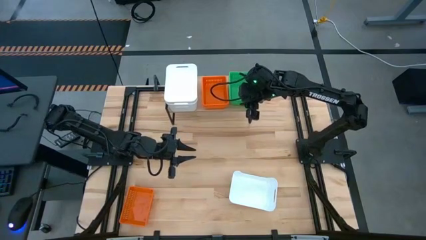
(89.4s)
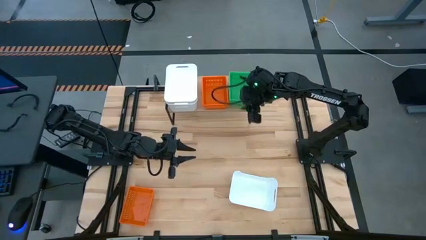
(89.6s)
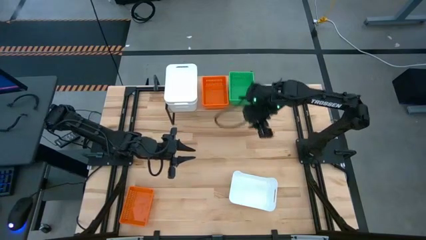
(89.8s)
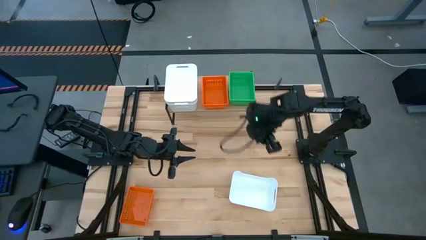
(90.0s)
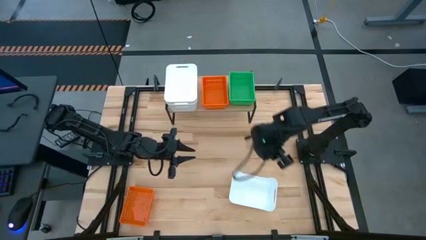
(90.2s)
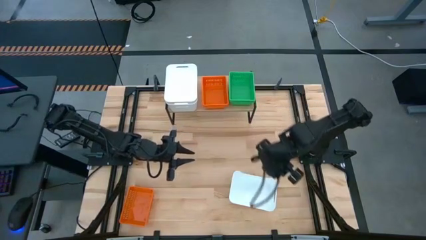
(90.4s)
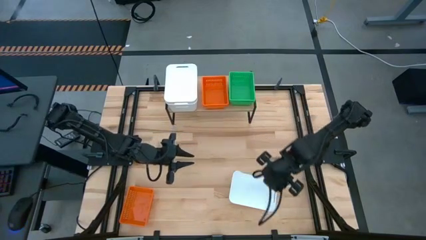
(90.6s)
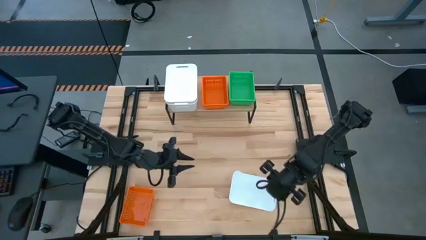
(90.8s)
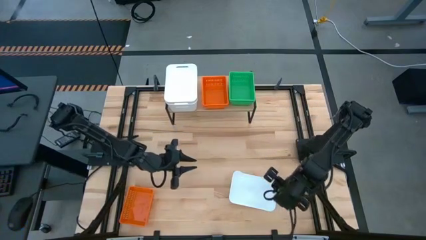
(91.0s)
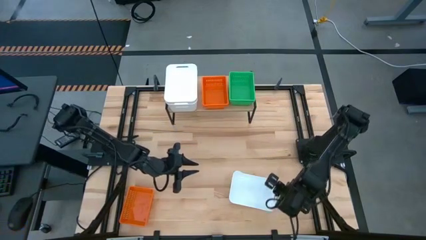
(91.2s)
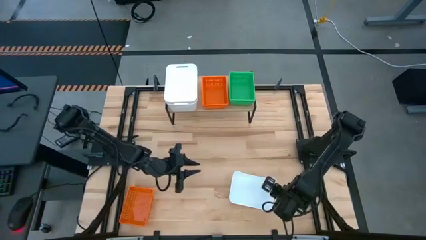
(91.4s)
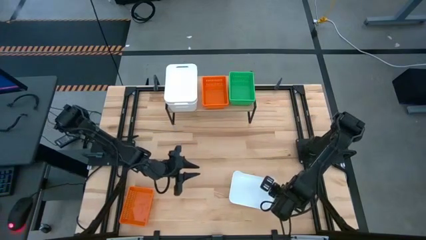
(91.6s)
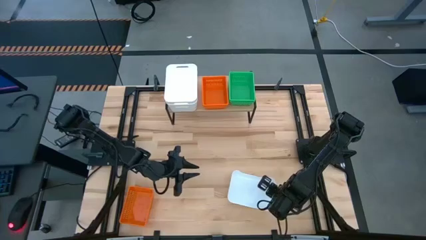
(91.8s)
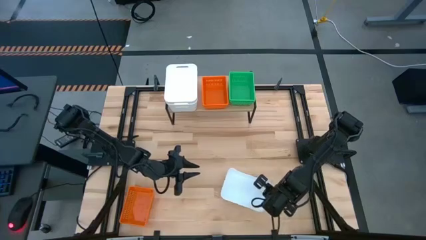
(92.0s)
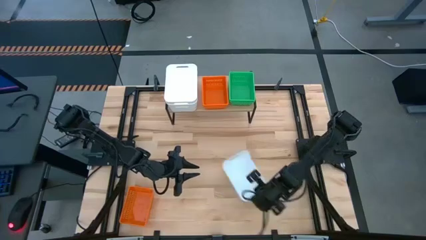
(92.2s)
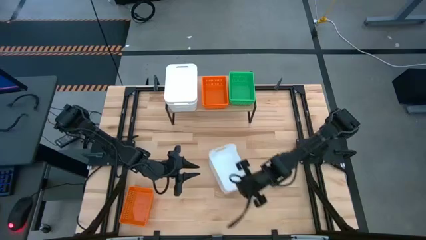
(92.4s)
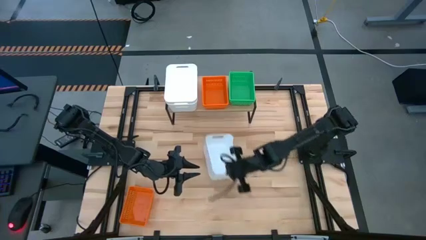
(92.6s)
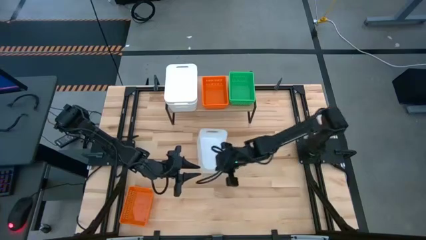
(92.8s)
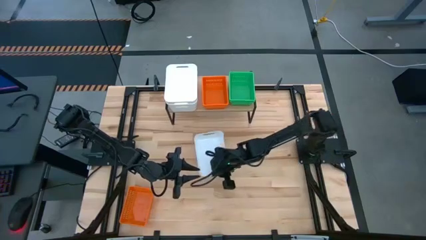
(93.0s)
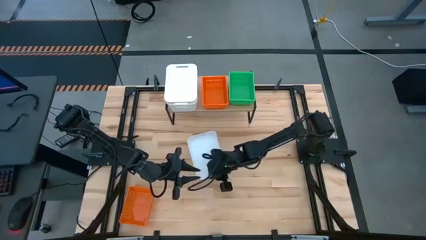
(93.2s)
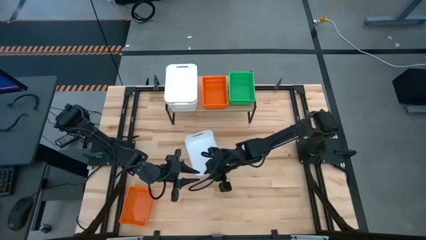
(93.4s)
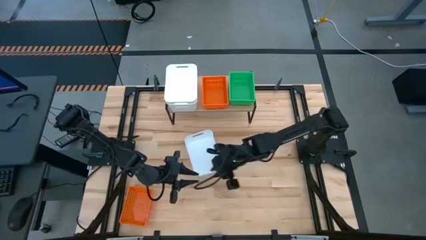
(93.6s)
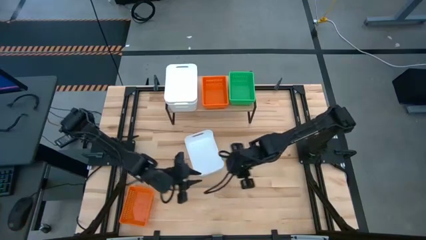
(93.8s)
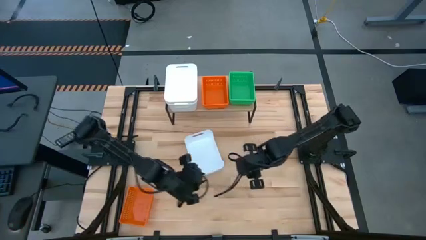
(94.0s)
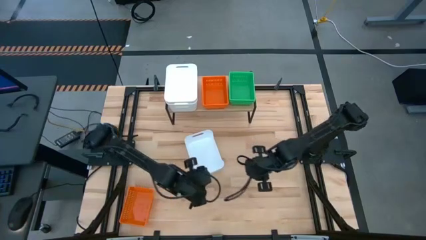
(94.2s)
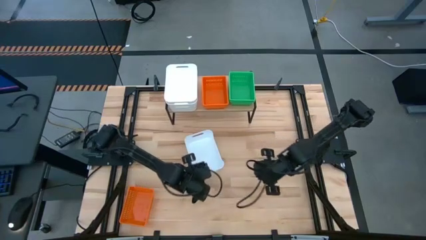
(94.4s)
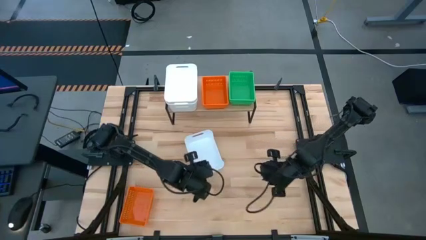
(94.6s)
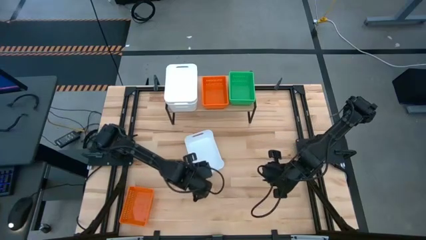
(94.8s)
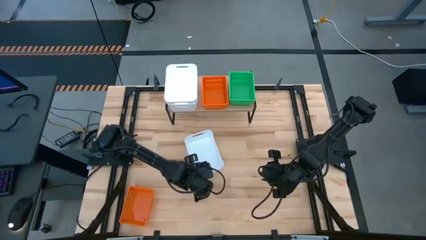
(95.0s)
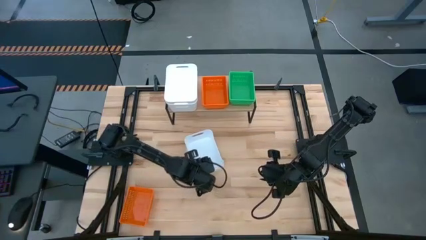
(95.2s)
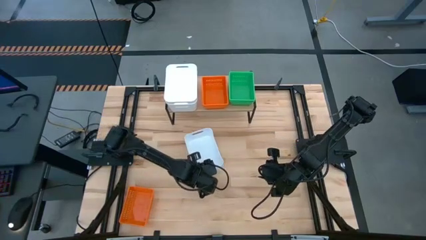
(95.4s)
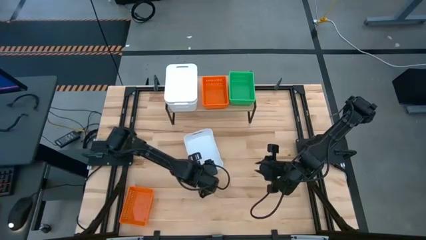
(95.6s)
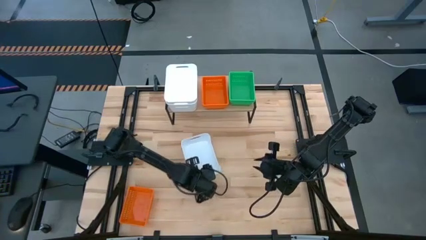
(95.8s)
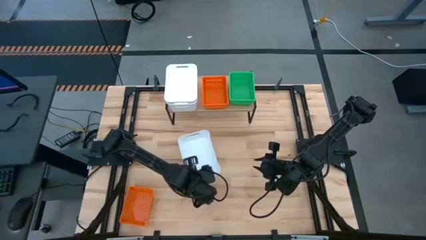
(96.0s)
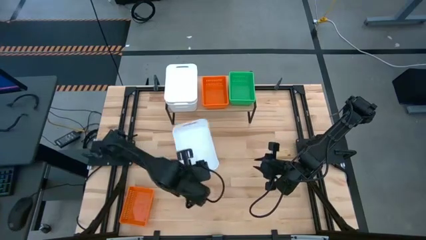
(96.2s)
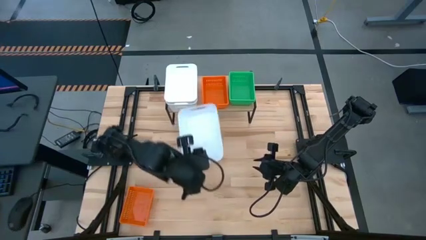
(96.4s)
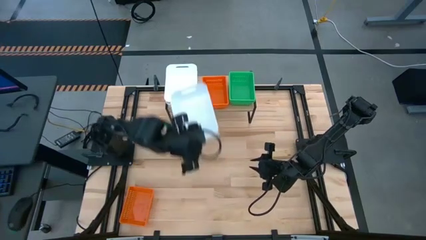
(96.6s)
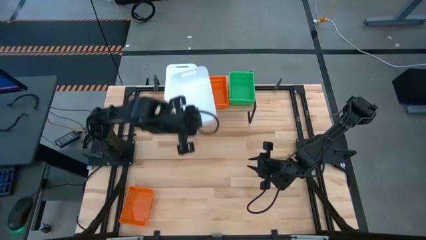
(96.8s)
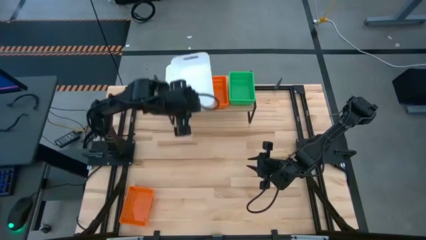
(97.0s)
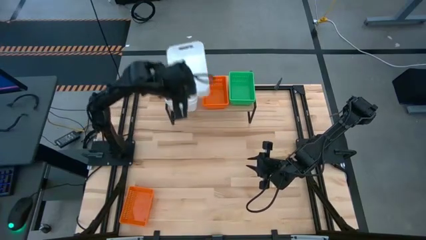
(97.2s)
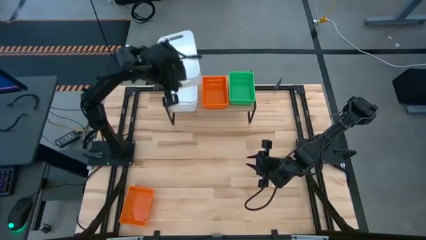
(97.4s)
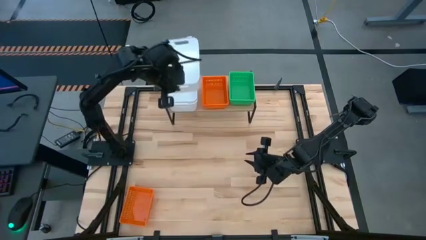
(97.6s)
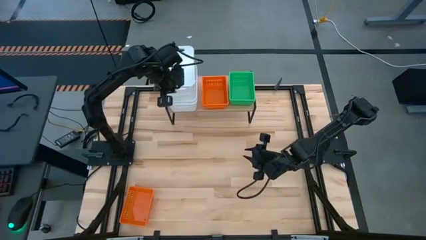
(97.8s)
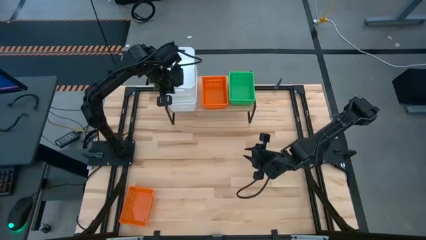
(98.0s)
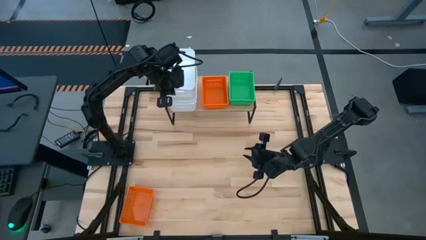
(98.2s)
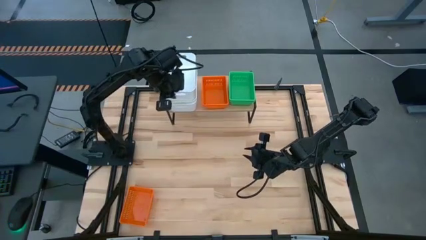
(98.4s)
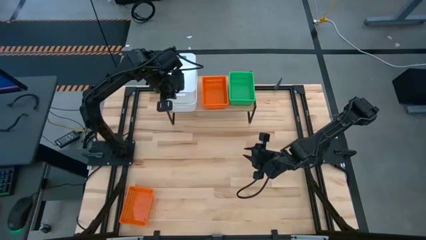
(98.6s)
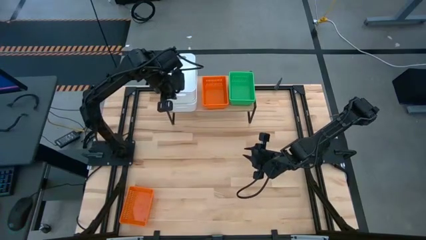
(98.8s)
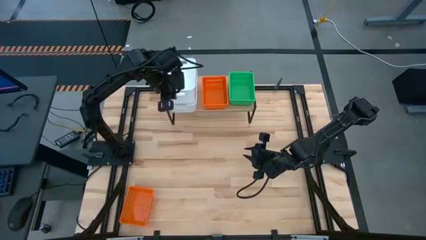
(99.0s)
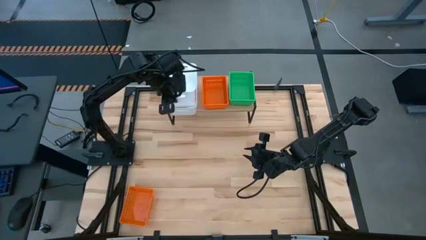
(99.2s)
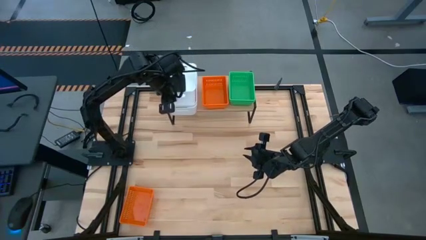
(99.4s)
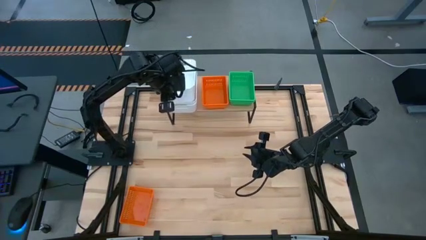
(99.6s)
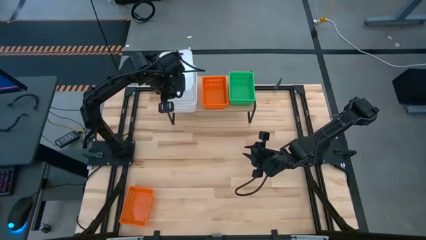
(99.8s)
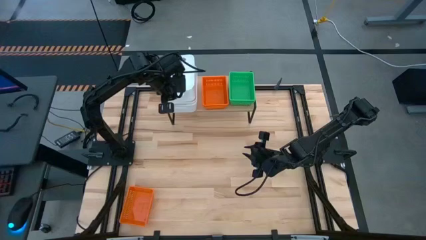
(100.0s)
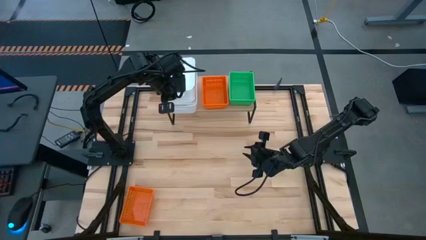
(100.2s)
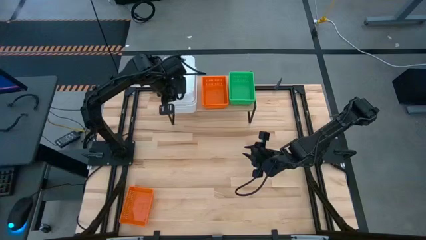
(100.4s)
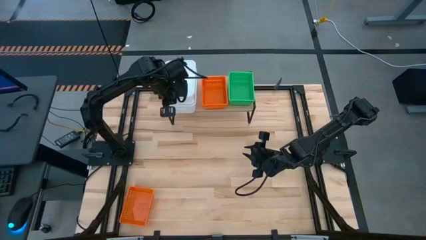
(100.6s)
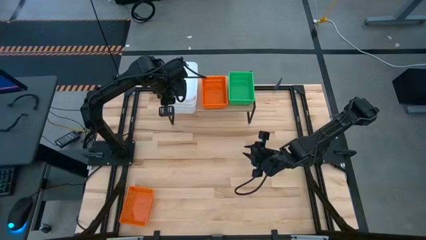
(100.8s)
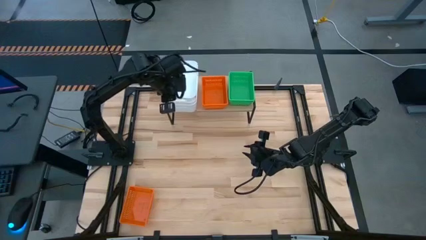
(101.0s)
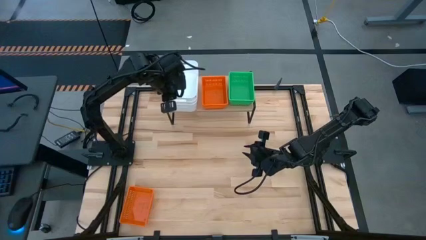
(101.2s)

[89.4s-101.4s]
Task: Stack baskets on shelf by color
Stack the white bin on top of the white bins on the shelf

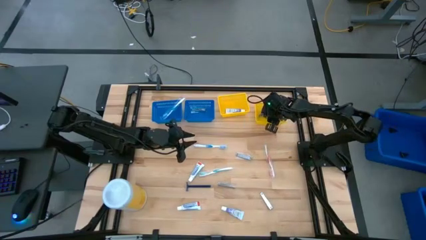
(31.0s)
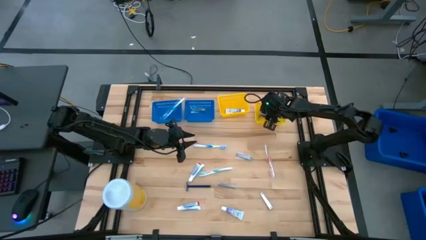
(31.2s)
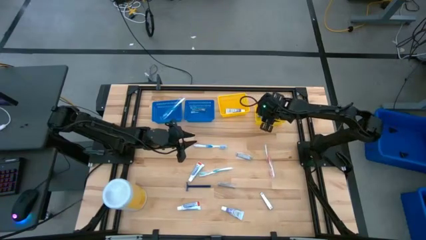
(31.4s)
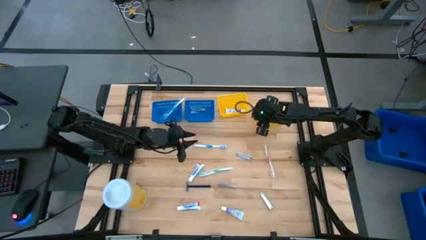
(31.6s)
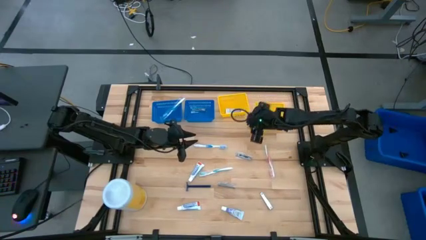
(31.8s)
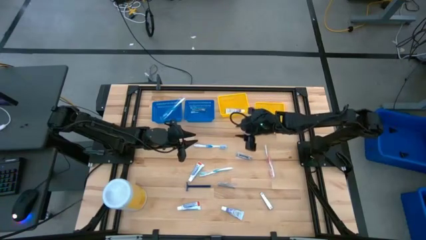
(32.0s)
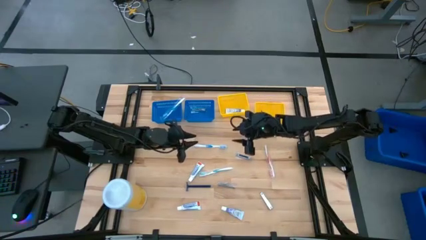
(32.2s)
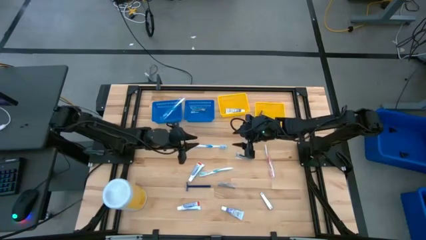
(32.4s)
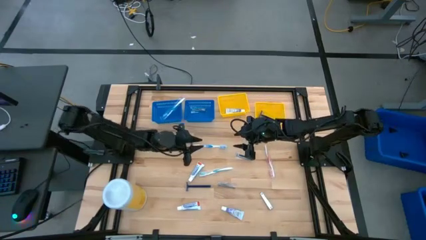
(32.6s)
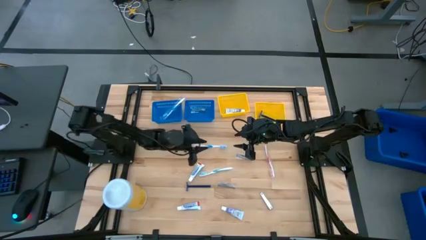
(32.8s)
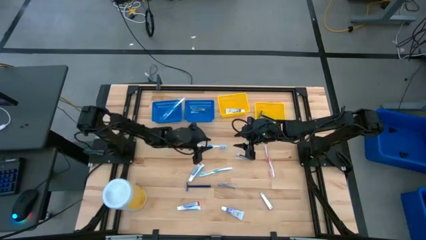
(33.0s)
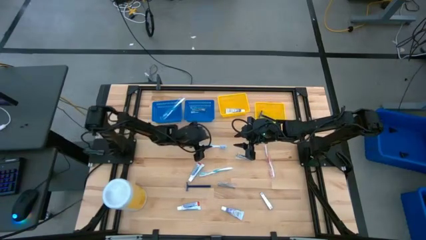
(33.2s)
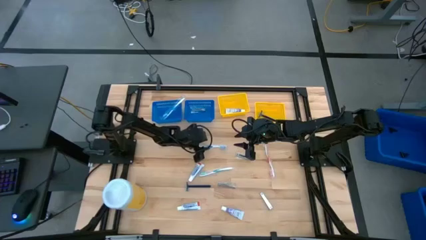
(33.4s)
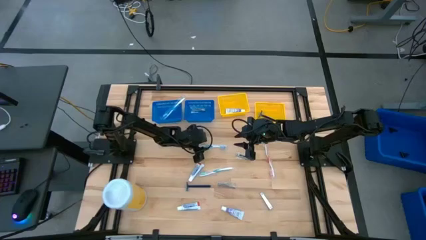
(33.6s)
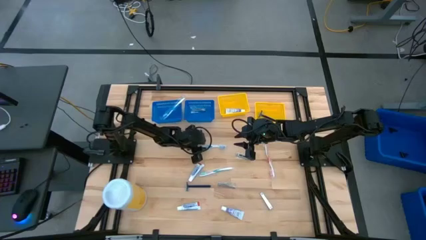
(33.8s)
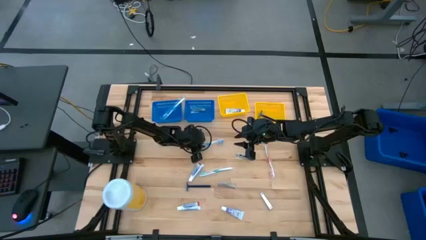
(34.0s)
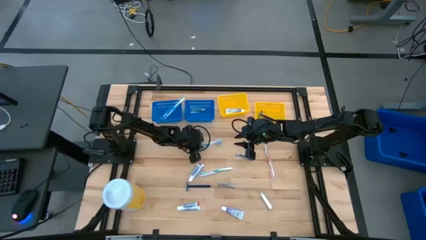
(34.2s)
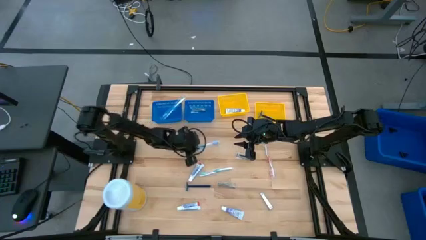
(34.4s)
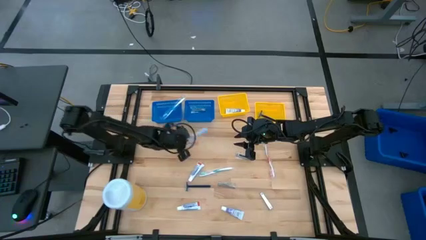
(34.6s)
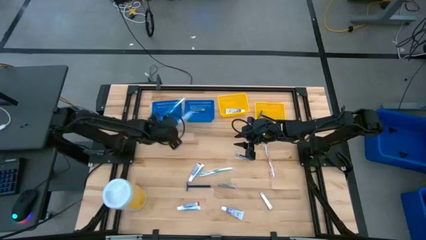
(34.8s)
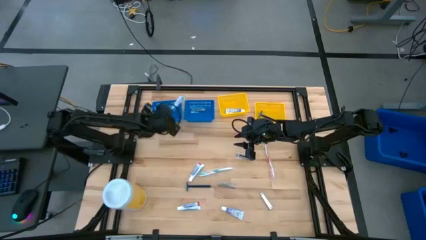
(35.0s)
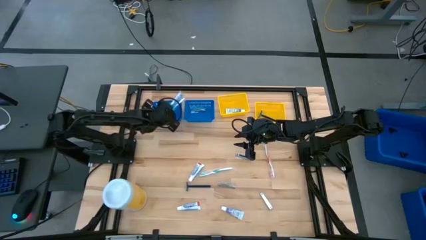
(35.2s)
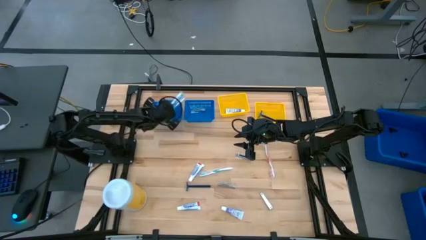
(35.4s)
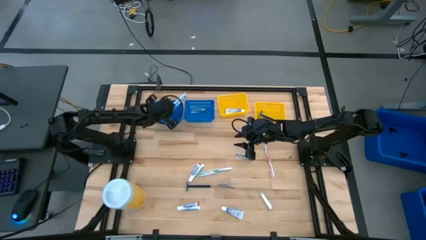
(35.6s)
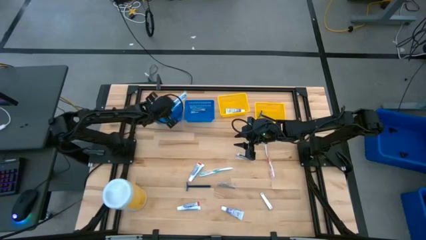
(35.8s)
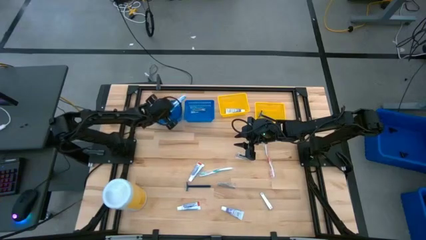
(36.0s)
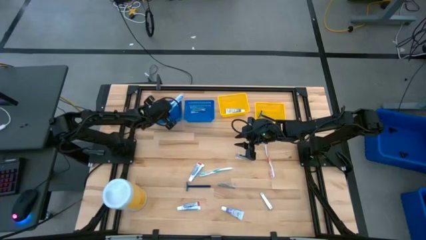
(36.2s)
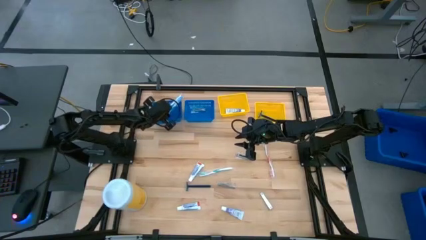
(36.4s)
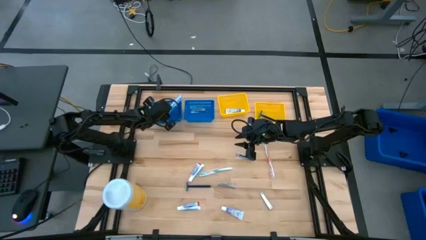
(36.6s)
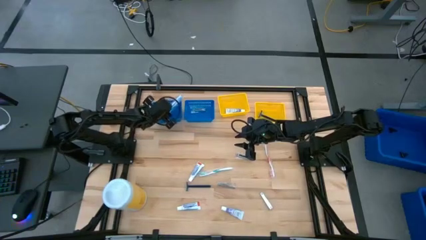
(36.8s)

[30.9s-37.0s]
Task: Pick & Place Travel size toiletries
Put the blue toothbrush into the left blue bin
